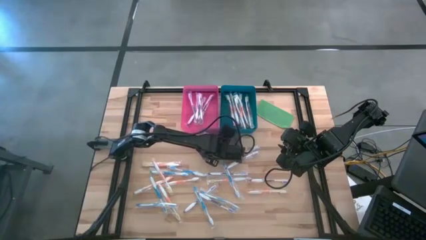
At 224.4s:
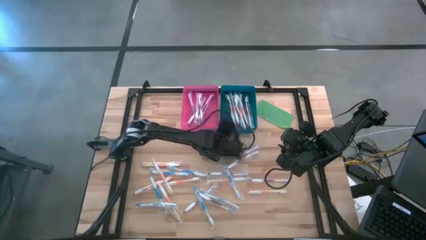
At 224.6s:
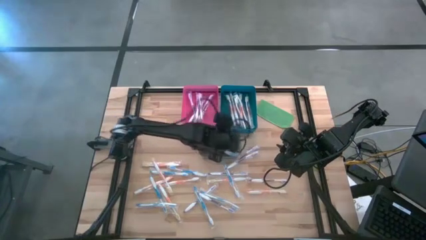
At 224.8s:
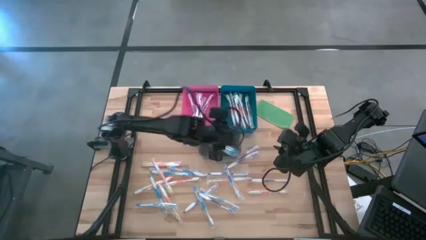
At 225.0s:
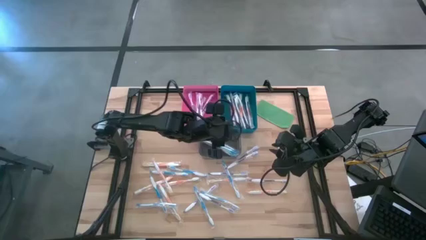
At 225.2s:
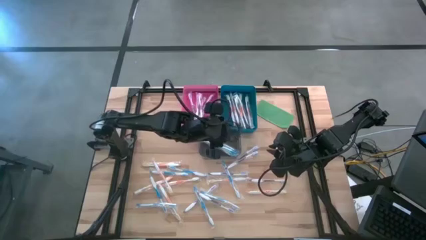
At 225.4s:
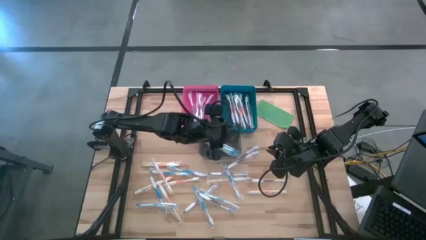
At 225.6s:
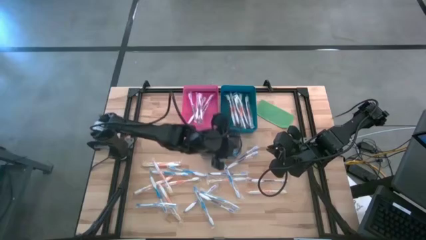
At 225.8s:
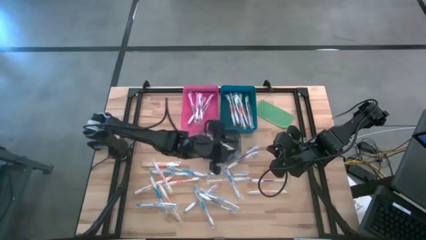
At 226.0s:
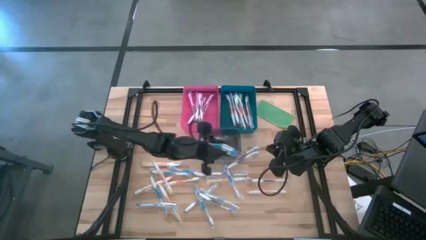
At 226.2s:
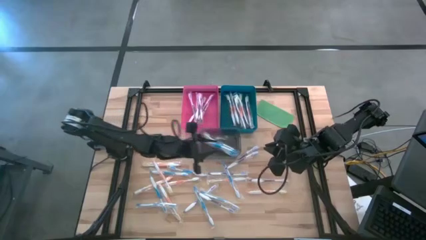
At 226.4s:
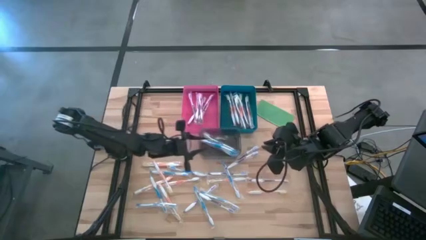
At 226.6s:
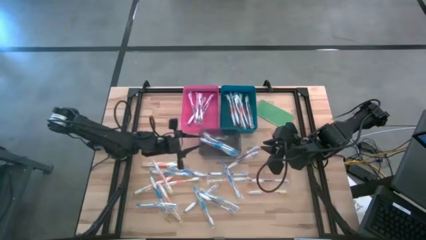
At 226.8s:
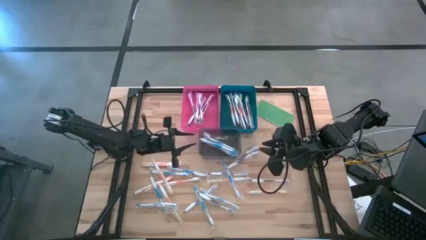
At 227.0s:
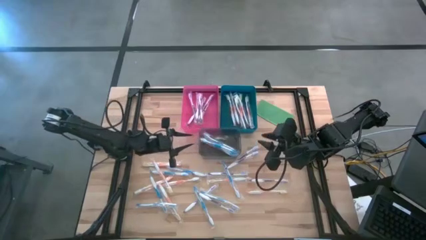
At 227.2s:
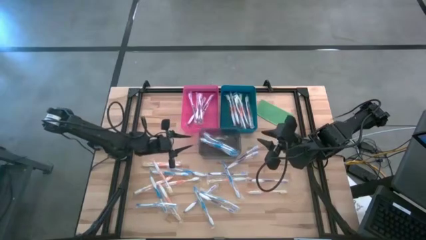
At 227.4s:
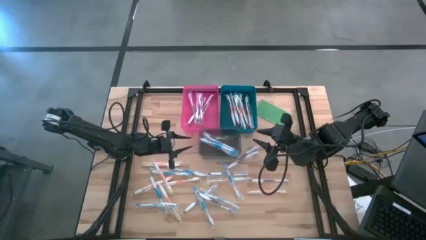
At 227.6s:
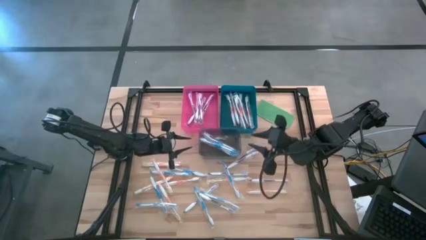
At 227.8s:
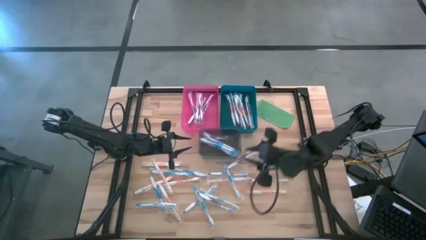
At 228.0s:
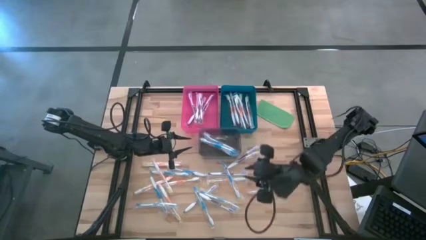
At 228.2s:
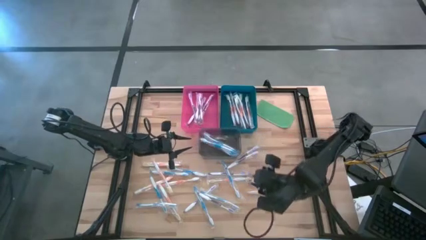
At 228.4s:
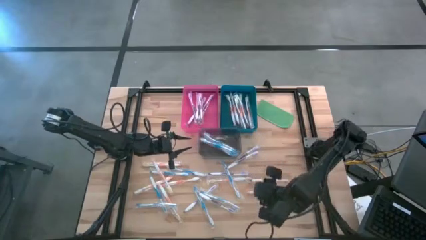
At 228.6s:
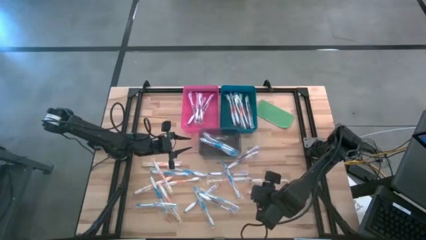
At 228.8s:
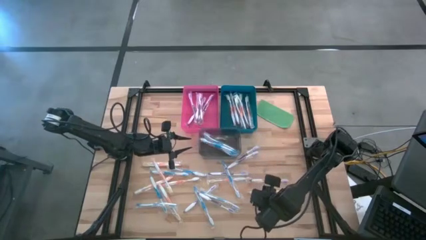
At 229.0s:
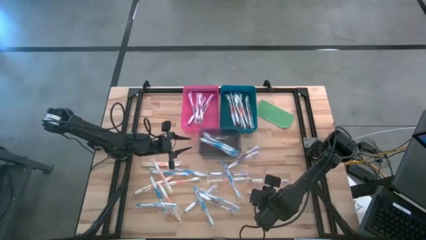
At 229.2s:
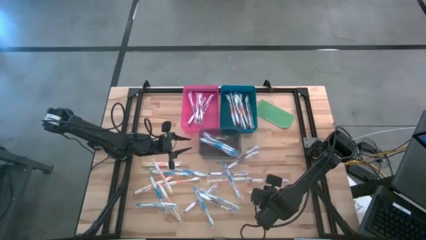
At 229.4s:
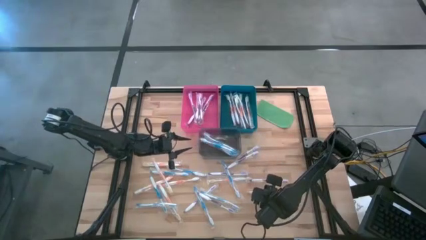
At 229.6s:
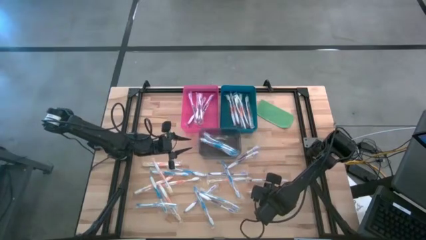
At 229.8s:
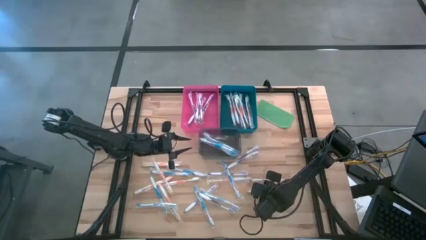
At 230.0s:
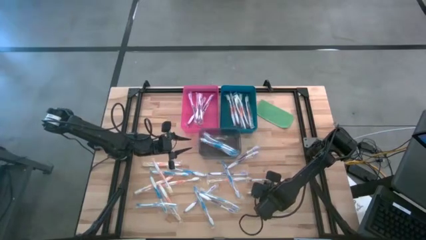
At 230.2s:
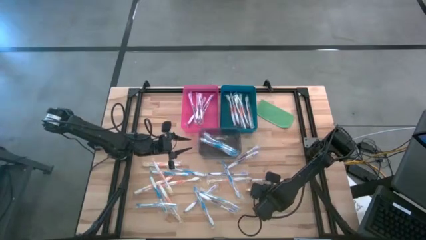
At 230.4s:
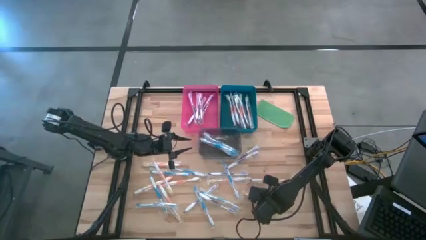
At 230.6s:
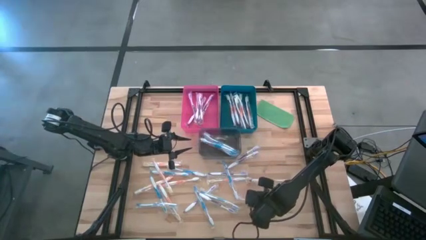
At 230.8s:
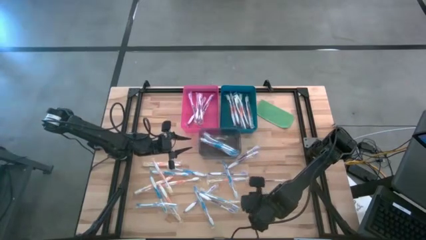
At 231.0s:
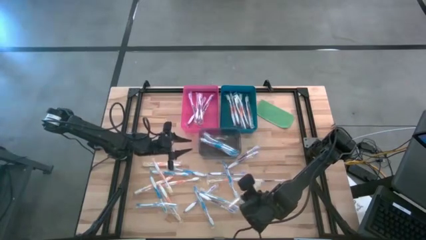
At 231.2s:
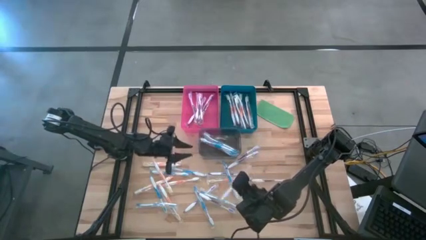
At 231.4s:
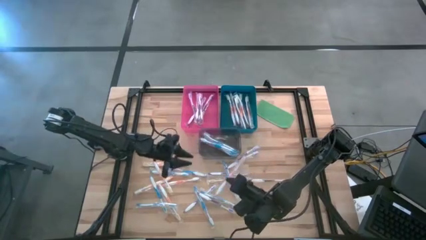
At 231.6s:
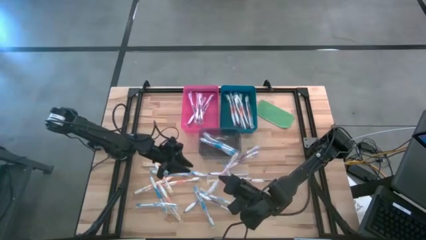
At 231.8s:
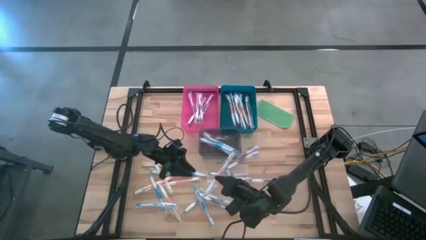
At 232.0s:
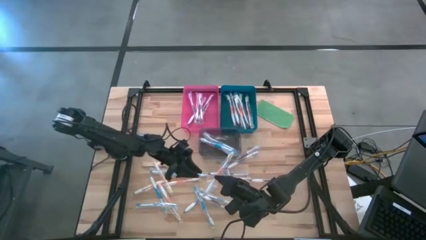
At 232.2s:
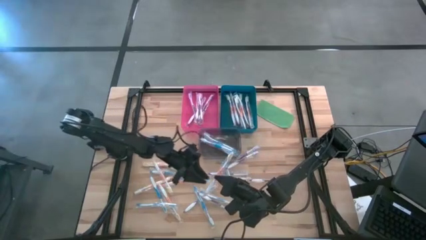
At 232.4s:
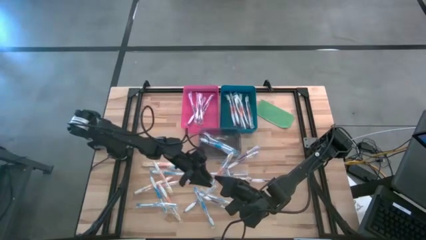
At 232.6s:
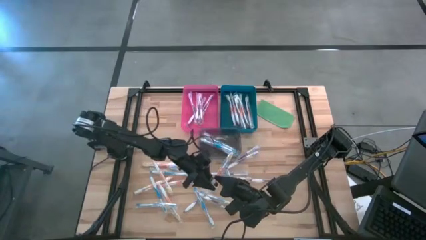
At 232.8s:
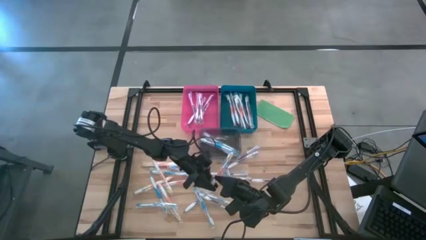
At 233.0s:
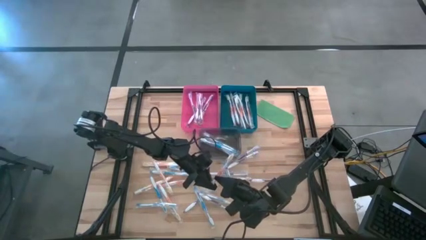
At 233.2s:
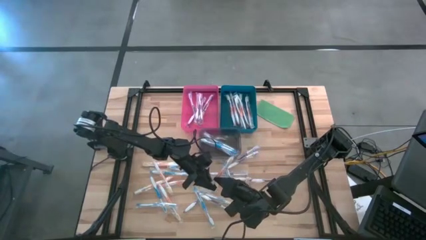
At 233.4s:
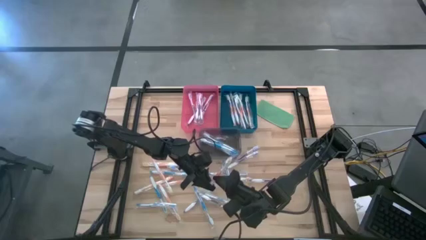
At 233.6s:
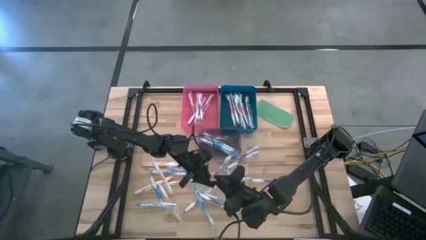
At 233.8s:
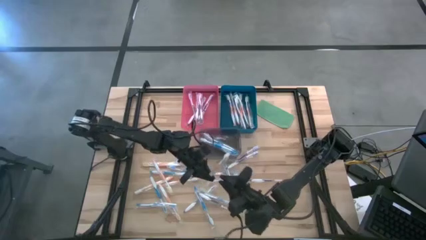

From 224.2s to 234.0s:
Task: Pick & Place Toothbrushes
Put the orange toothbrush into the blue bin

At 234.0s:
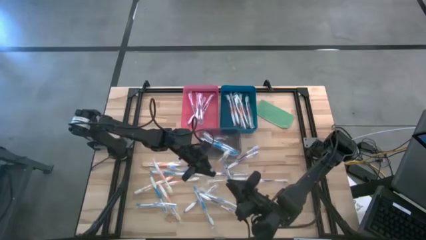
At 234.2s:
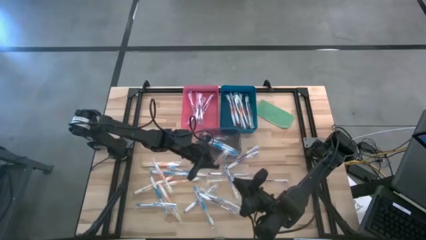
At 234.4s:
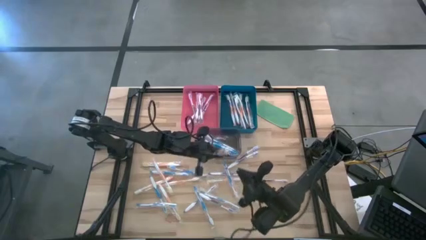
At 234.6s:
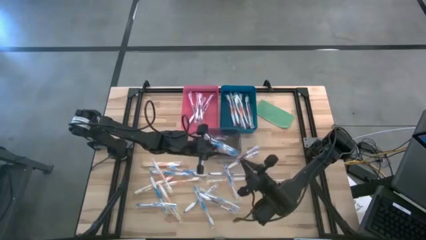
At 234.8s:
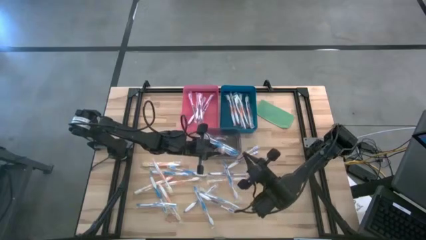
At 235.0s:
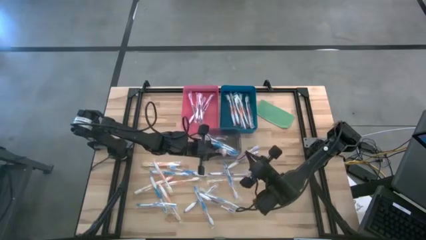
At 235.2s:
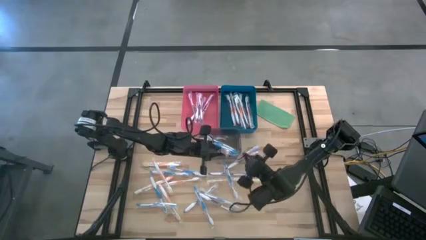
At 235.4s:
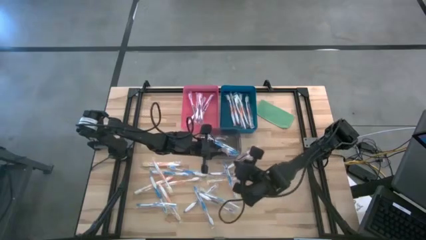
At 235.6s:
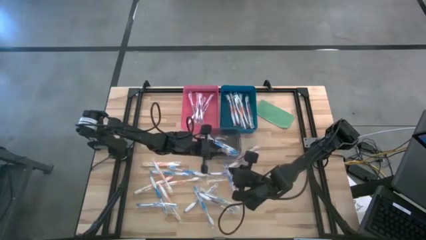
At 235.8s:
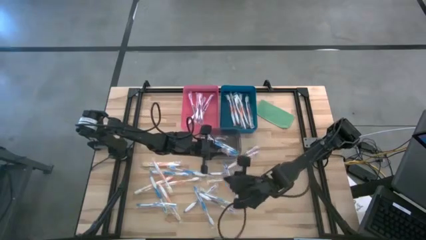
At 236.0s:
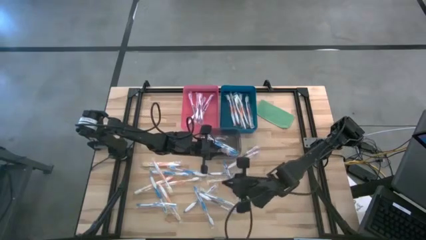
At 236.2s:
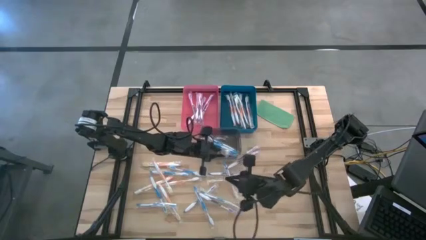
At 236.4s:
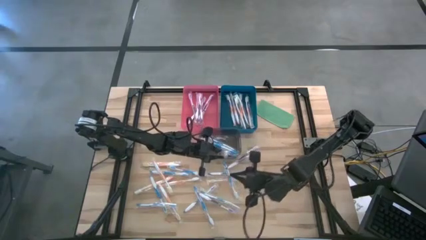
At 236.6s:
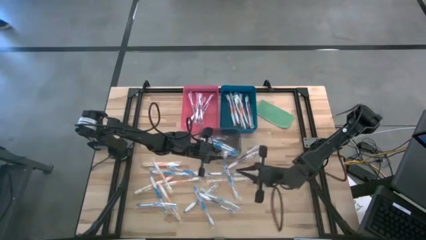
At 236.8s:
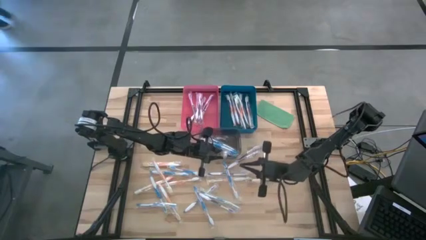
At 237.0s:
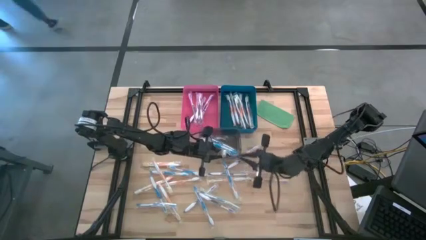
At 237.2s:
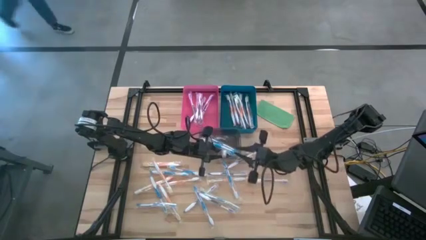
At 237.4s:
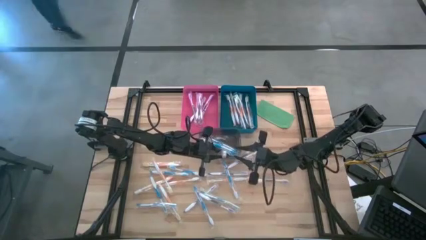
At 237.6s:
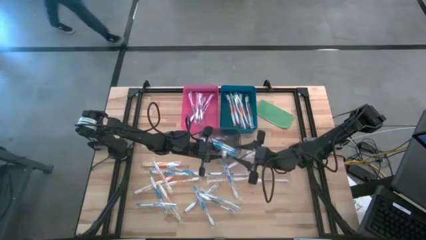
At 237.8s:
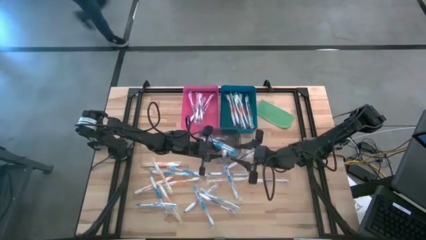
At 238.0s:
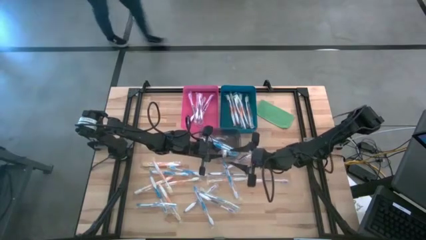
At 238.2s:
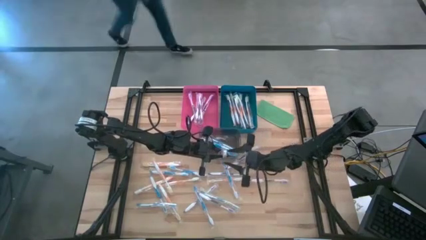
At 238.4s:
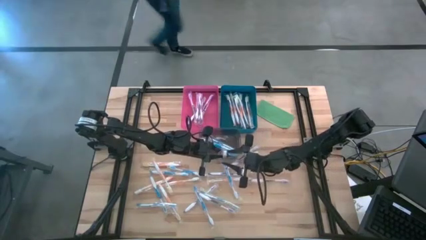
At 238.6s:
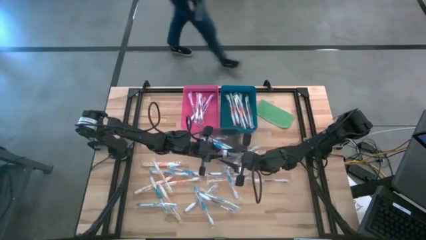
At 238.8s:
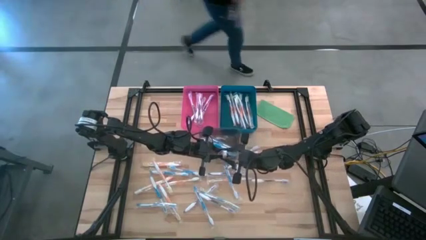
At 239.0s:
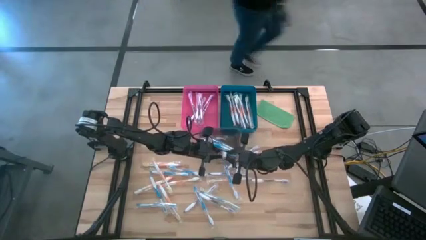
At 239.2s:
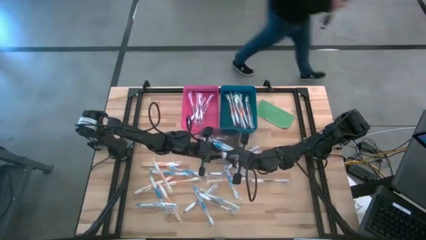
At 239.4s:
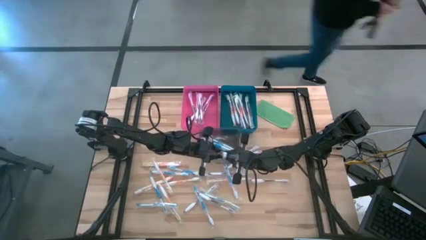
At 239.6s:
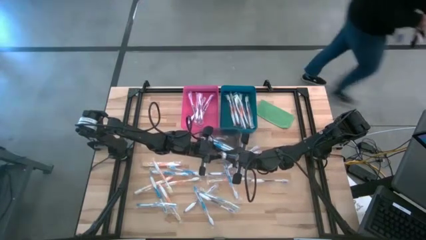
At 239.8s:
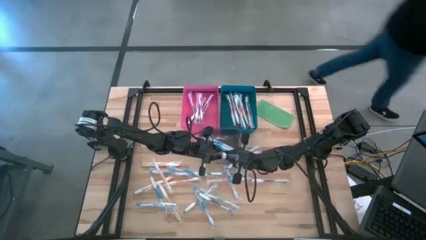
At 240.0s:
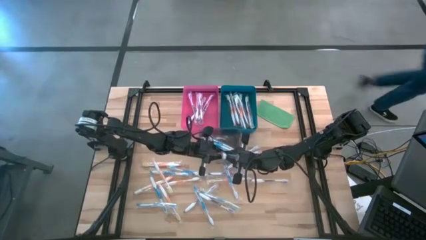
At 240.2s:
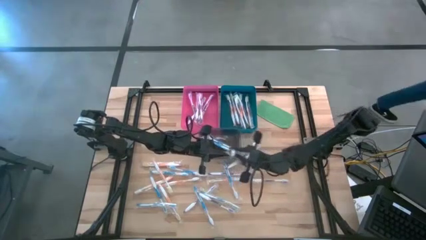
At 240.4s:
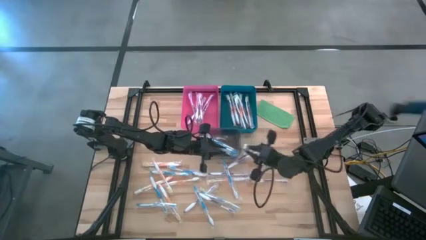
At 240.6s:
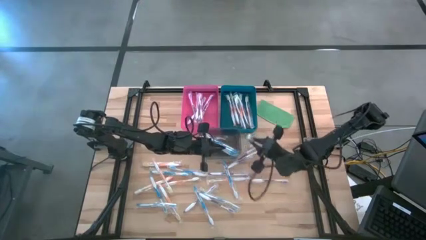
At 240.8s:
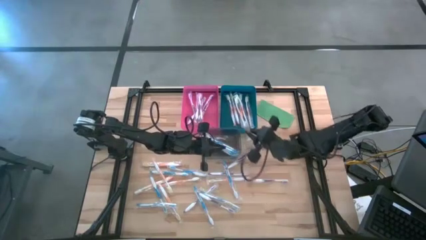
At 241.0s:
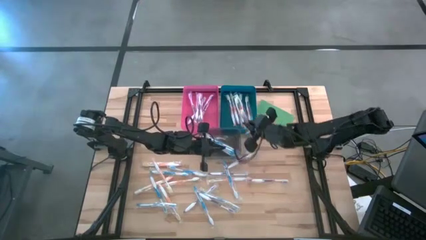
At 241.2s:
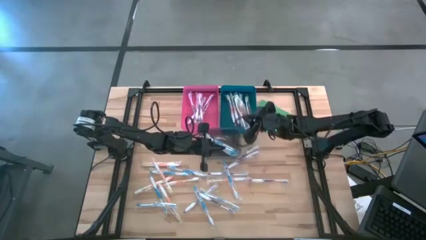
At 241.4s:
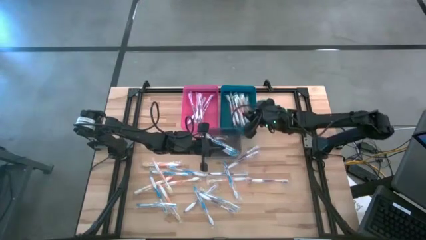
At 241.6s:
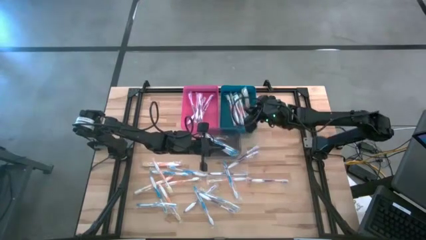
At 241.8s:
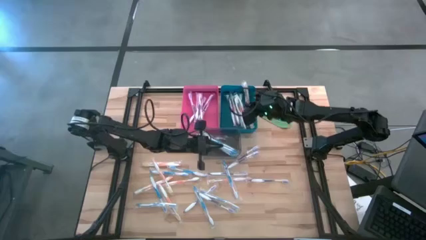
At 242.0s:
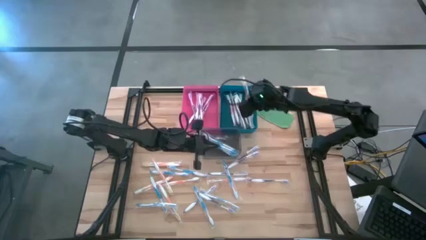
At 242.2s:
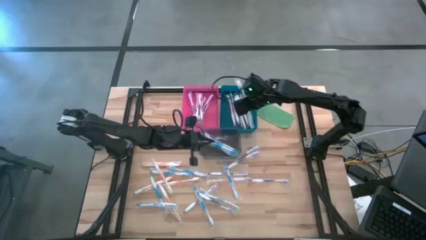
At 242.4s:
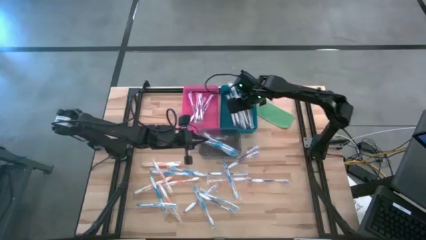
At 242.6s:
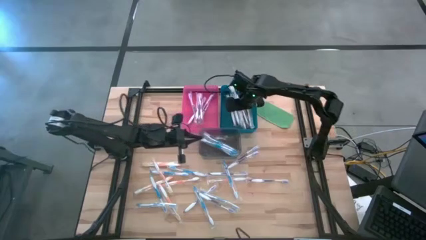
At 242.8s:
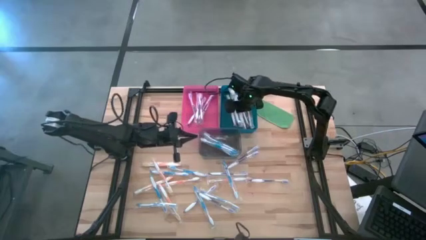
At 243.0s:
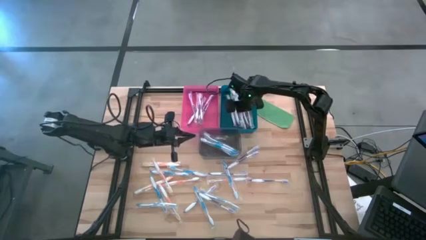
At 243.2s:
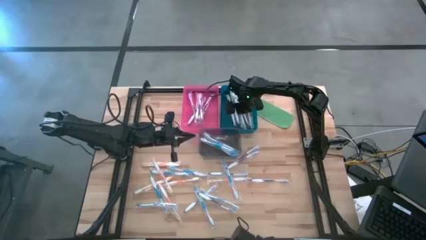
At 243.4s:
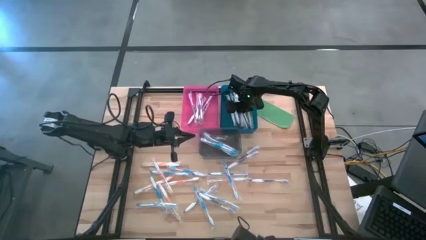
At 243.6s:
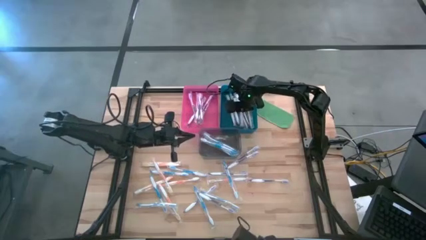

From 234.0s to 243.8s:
Put the orange toothbrush into the blue bin
